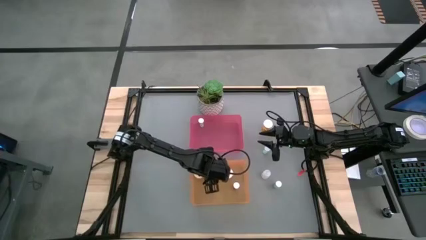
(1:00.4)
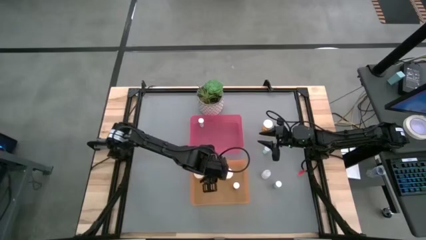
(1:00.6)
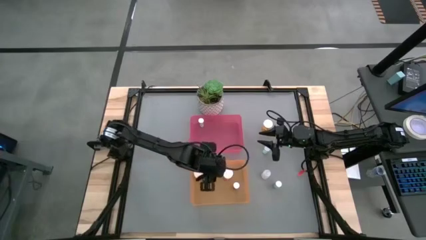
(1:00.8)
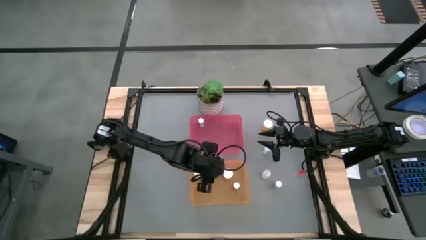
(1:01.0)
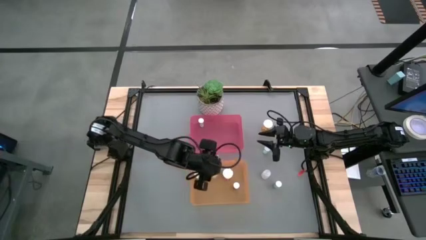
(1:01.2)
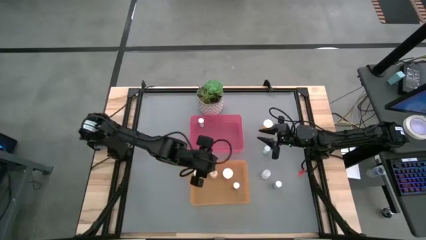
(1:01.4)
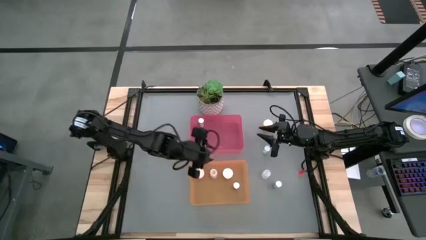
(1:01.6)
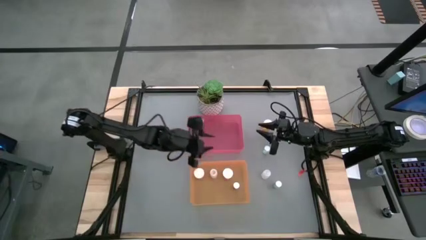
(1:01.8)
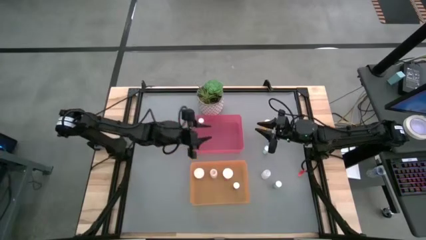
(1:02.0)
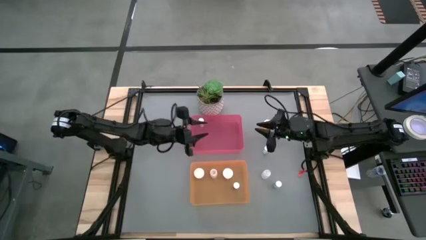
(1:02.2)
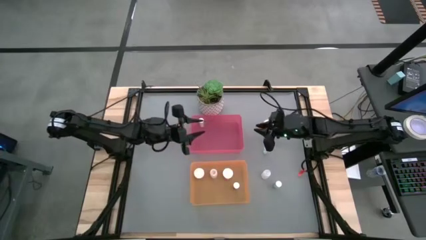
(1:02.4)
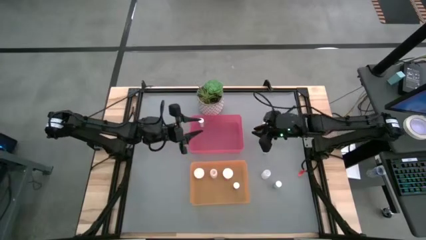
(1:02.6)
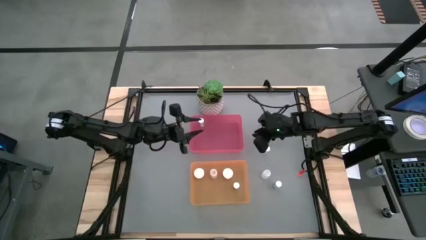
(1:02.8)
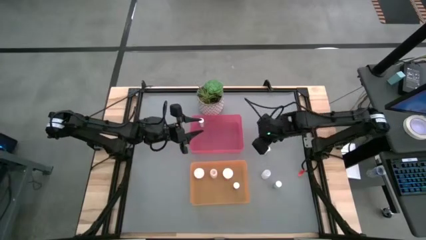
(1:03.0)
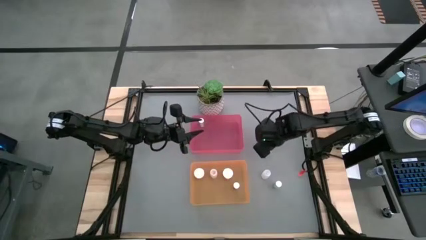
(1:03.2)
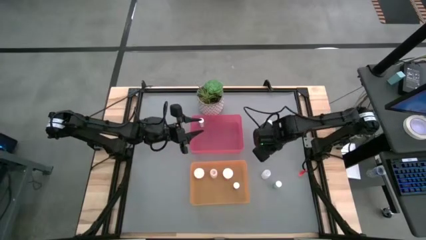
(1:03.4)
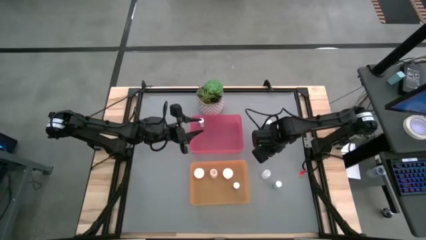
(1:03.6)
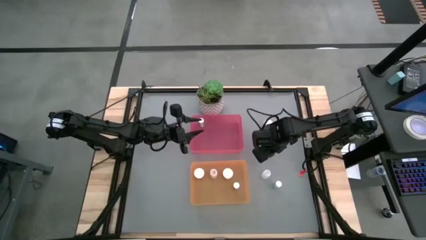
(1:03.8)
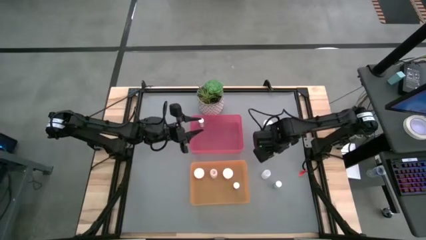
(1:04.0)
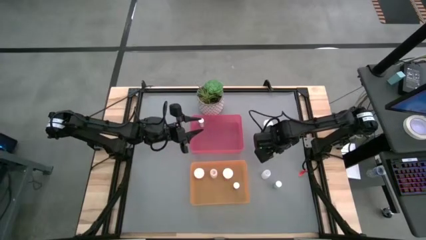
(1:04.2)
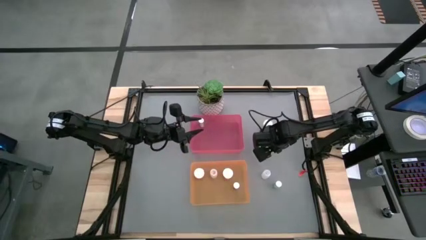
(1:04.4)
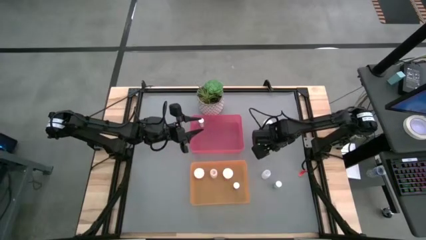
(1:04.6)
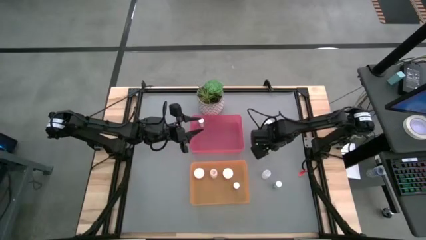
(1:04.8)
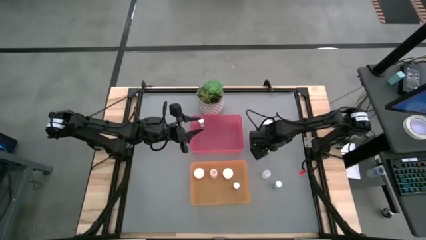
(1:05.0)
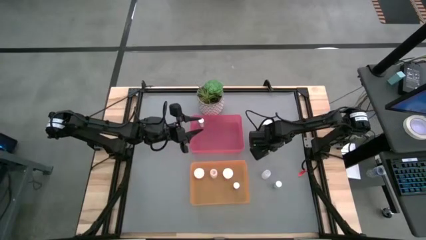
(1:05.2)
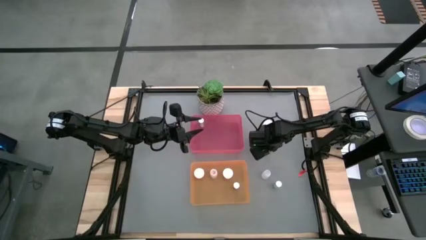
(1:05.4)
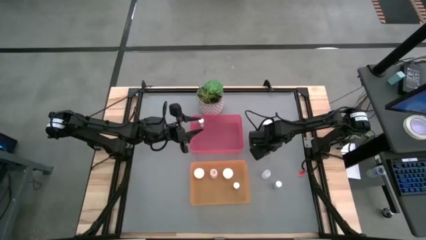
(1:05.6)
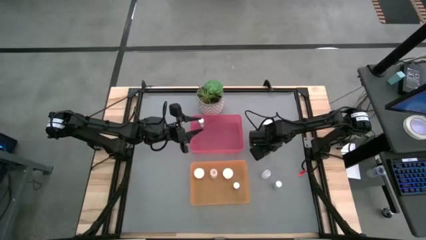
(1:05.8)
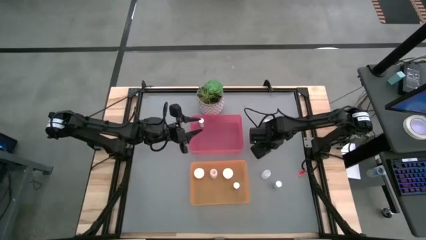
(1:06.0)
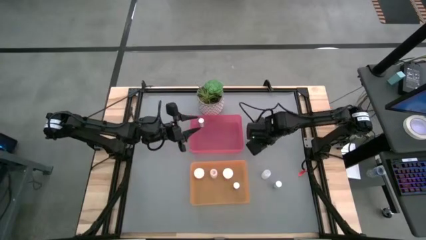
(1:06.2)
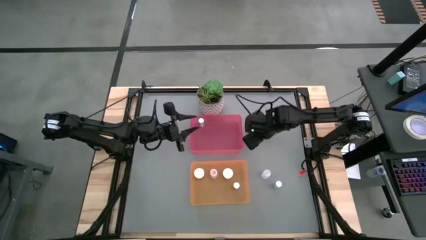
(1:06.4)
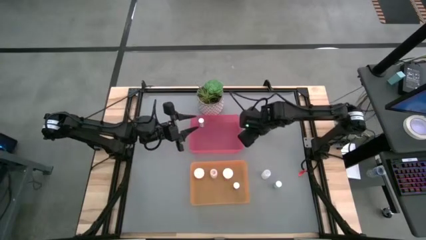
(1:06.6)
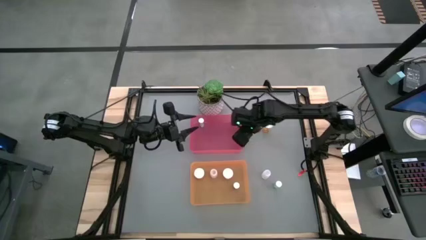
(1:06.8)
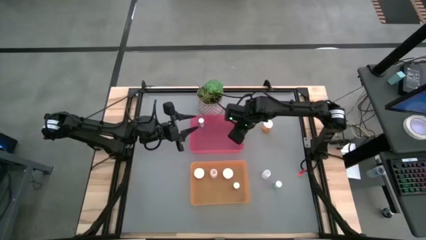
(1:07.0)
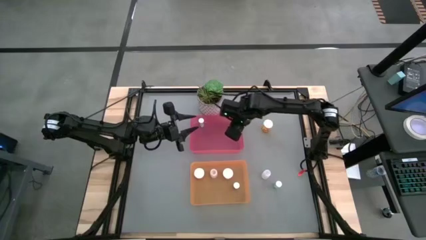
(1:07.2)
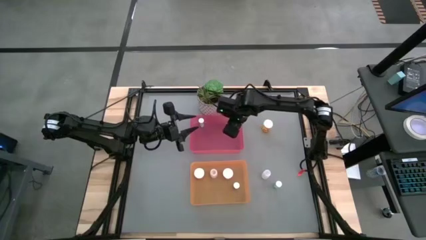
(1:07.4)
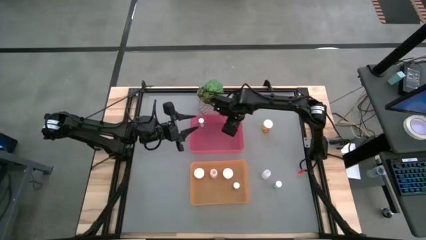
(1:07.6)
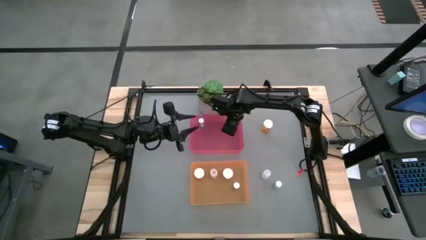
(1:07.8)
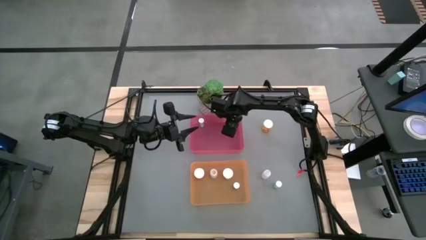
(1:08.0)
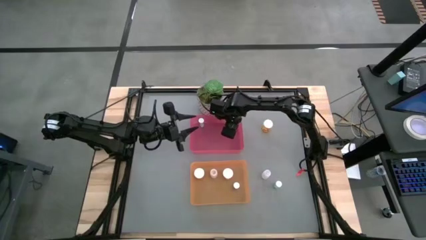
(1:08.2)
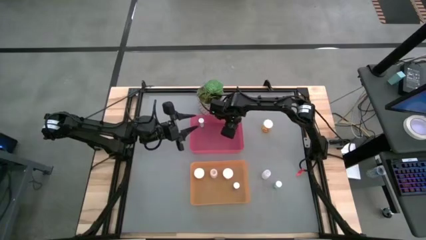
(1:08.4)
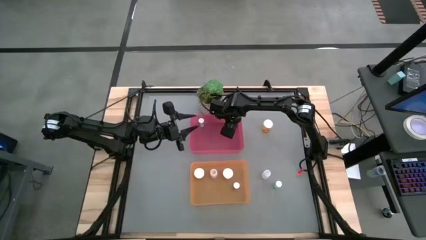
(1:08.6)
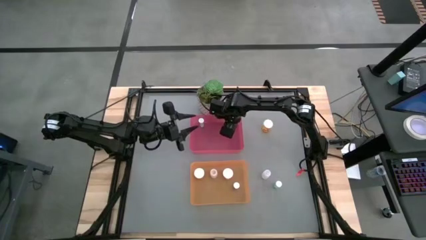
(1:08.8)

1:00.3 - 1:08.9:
Task: Pick and place medicine bottles into bin by pill shape (circle, oval)
Put the left blue tablet bottle into the pink bin

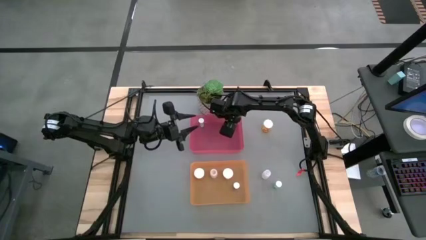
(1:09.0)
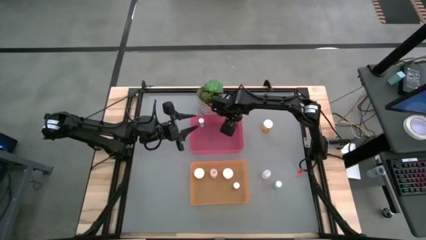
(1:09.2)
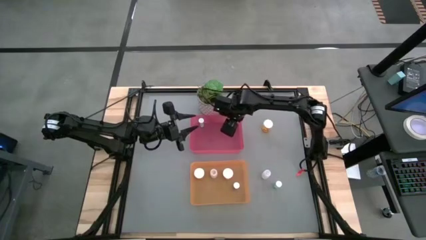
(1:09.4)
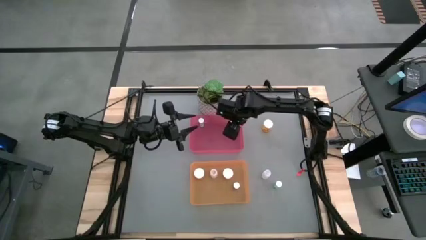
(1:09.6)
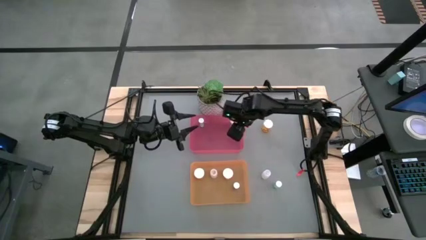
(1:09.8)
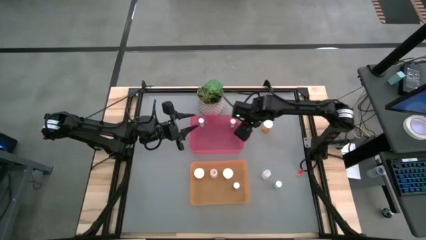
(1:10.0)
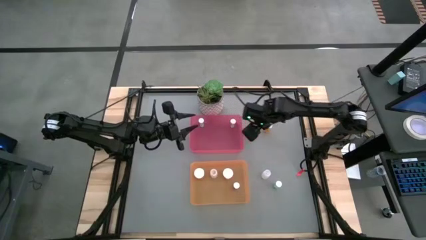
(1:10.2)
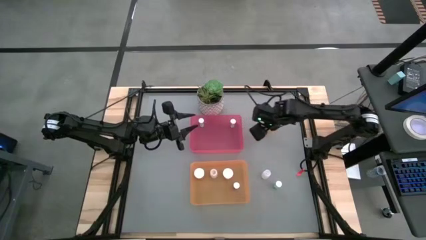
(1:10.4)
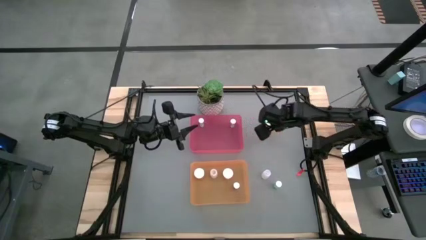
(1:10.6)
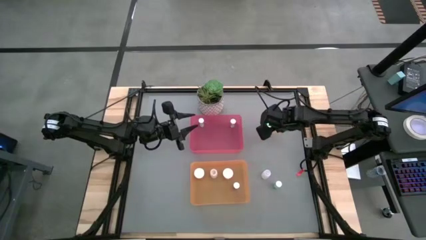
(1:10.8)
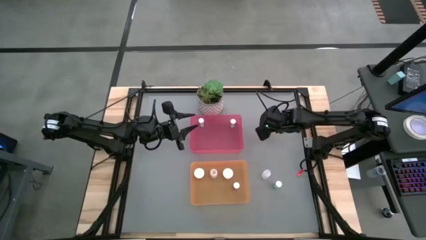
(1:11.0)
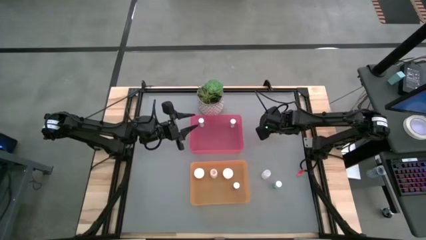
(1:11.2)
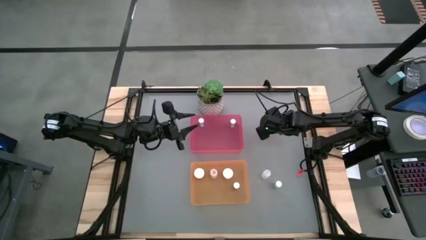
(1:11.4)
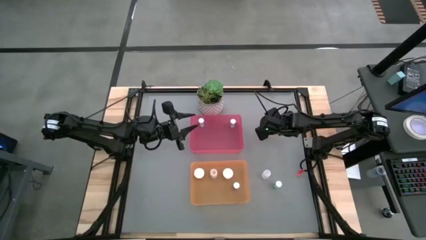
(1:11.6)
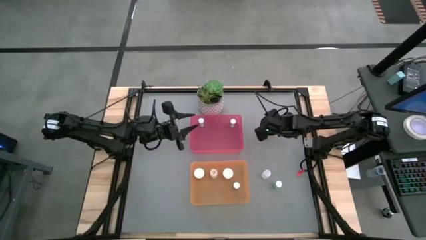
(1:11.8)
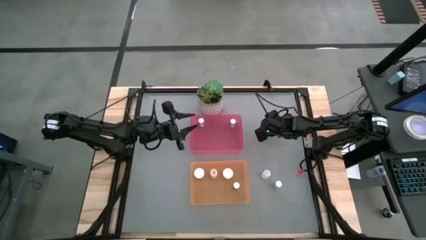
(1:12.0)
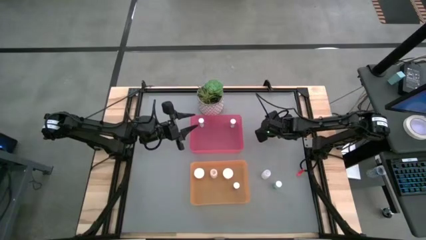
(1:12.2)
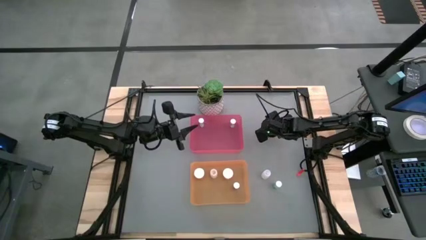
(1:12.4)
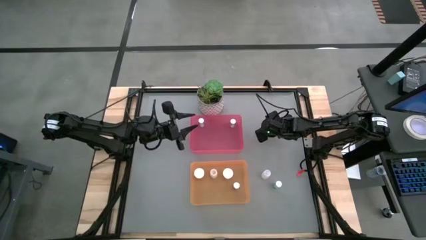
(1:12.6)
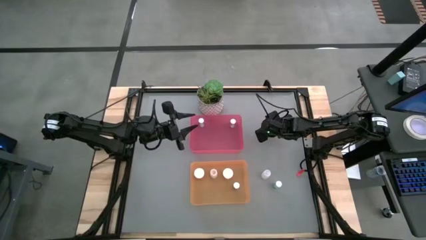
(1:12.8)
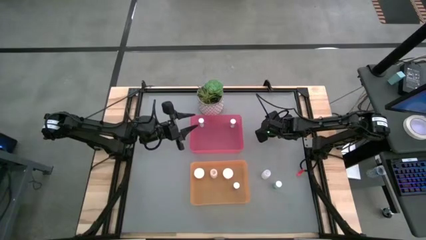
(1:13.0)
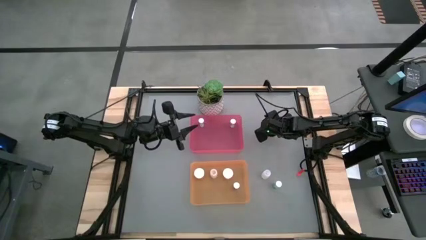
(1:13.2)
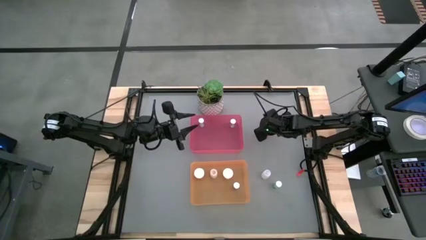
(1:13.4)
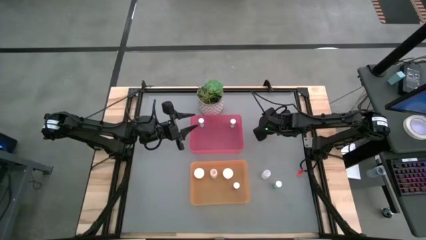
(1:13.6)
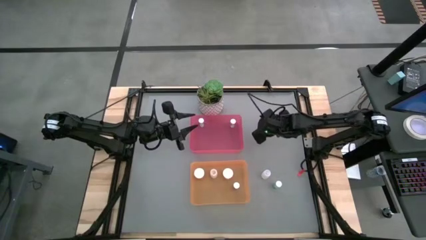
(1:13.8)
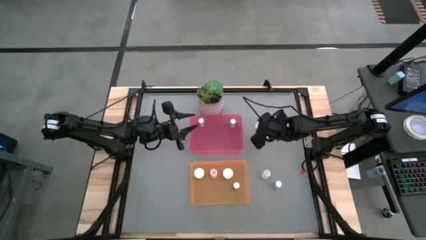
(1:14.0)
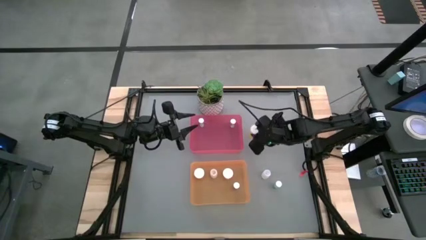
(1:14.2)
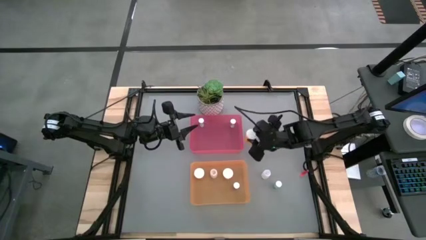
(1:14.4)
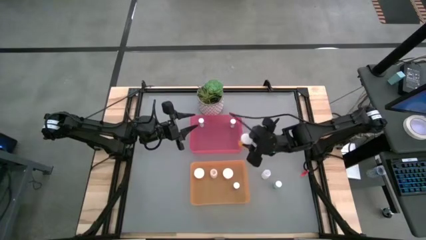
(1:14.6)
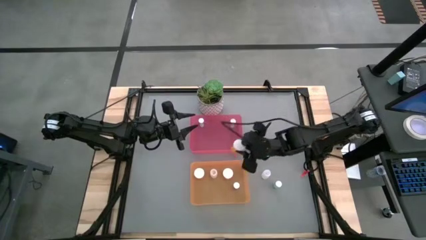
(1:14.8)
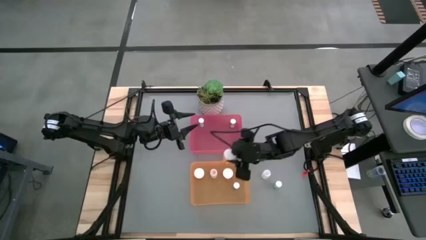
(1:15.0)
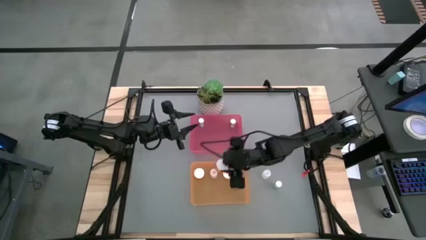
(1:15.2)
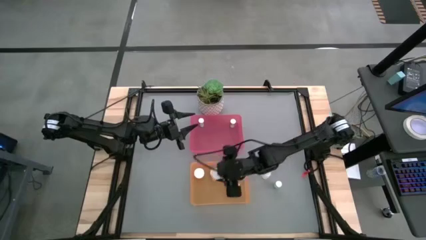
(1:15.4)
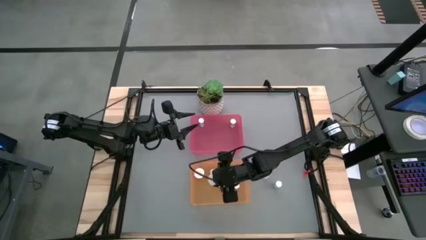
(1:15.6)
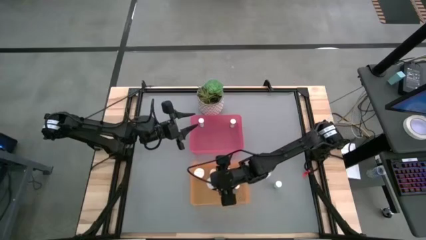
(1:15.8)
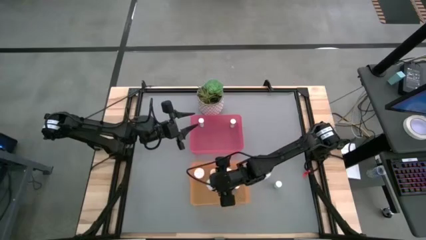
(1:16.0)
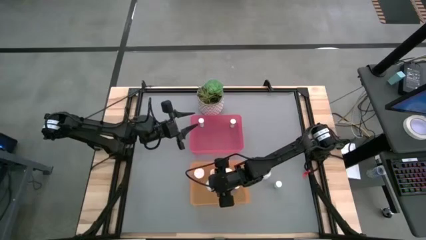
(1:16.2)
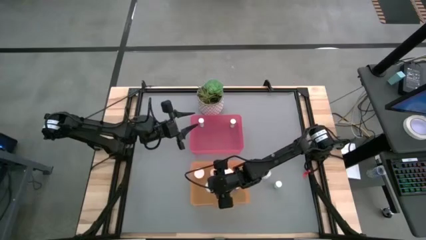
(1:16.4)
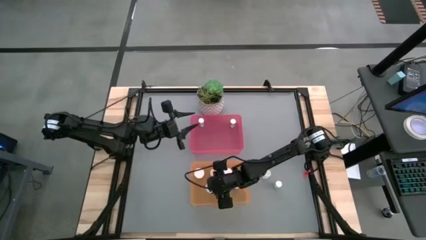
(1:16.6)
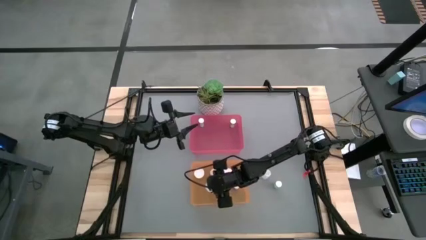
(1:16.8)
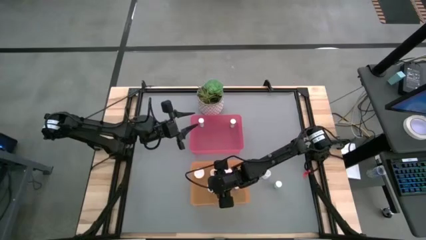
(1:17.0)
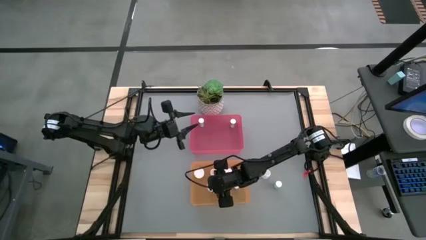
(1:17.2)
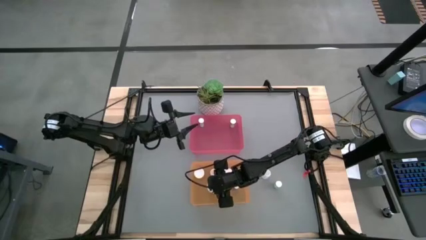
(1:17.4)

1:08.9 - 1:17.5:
Put the orange capsule bottle into the orange bin
